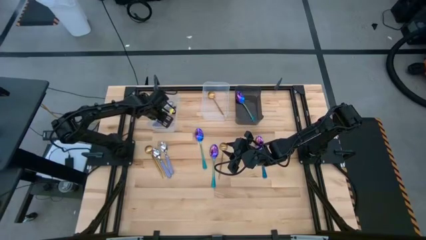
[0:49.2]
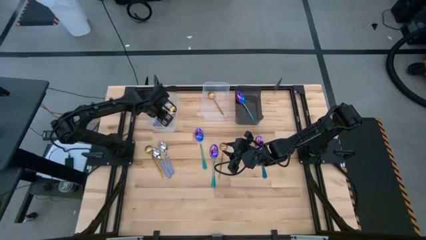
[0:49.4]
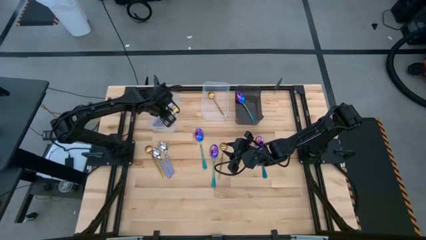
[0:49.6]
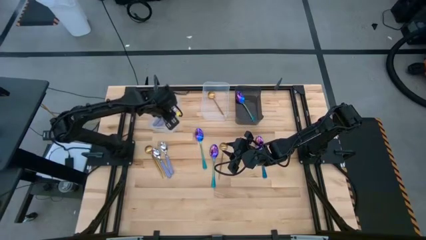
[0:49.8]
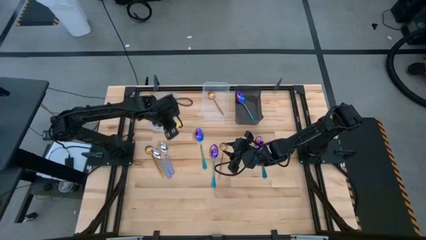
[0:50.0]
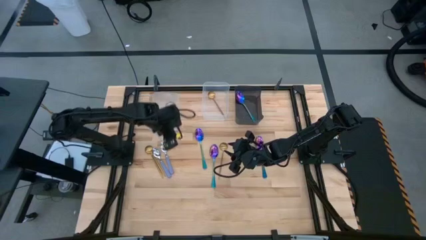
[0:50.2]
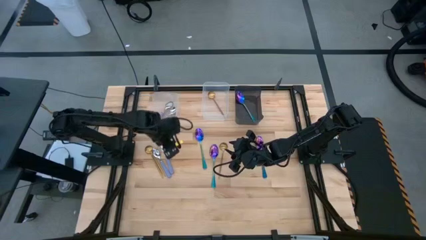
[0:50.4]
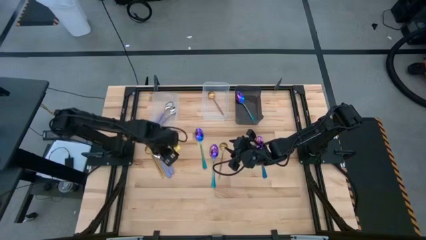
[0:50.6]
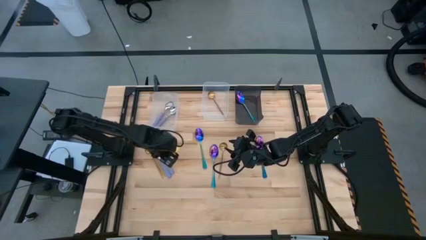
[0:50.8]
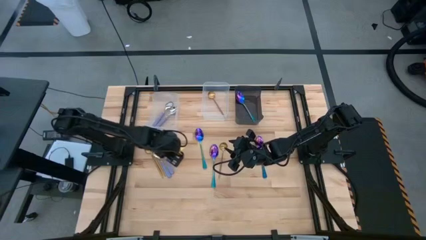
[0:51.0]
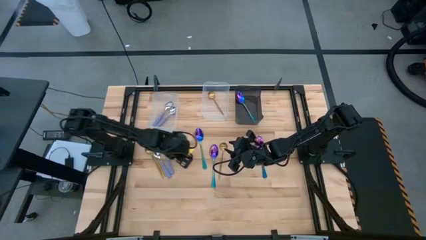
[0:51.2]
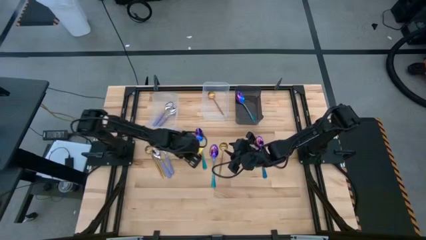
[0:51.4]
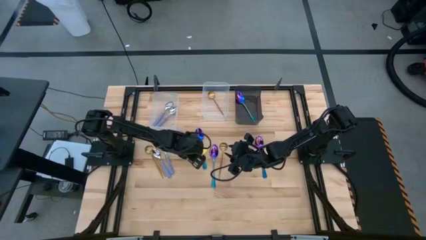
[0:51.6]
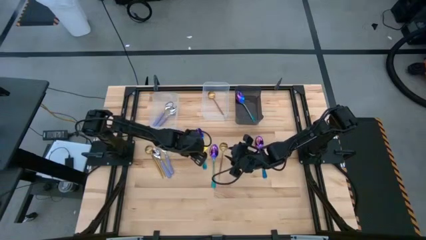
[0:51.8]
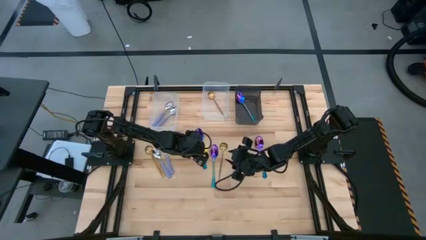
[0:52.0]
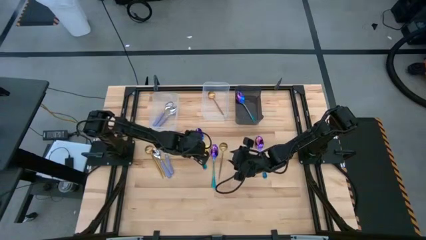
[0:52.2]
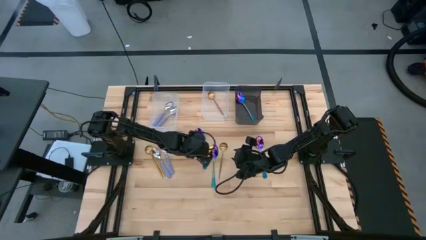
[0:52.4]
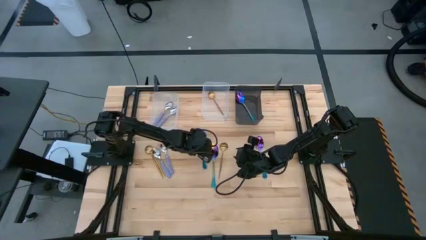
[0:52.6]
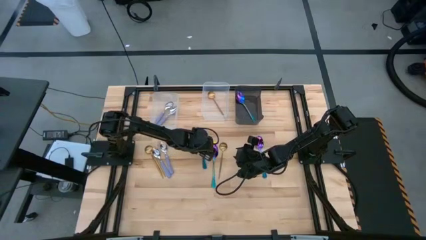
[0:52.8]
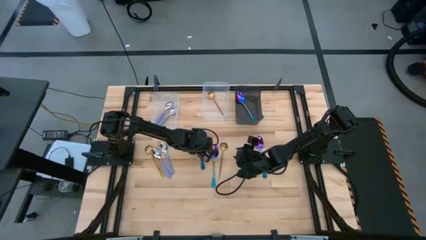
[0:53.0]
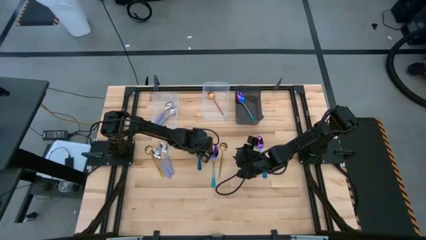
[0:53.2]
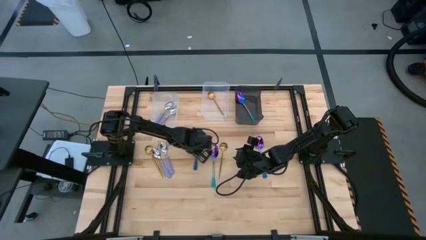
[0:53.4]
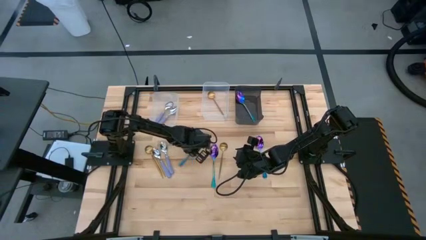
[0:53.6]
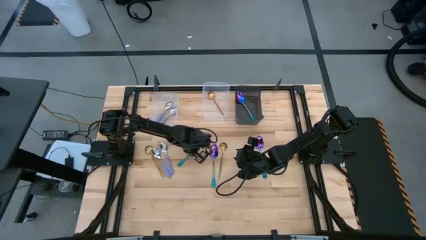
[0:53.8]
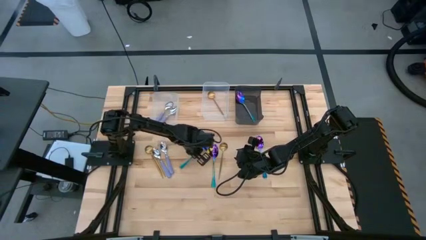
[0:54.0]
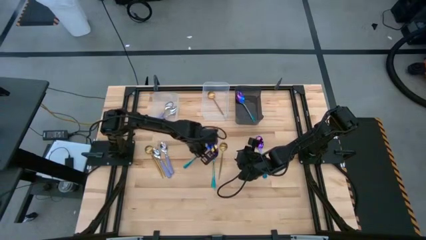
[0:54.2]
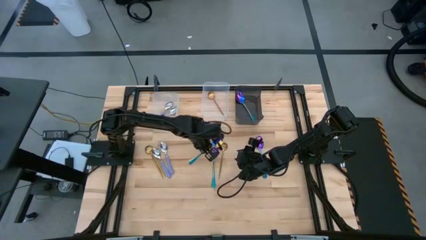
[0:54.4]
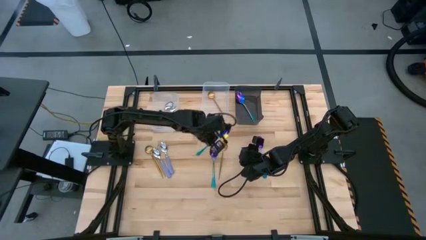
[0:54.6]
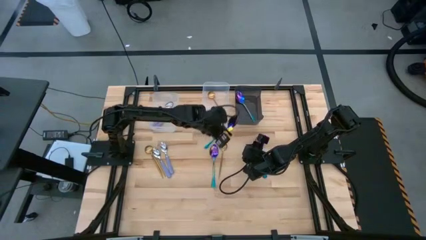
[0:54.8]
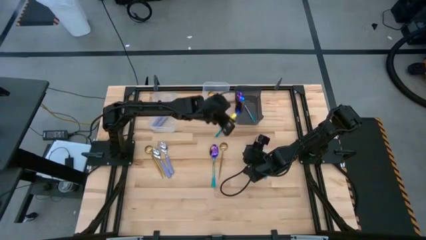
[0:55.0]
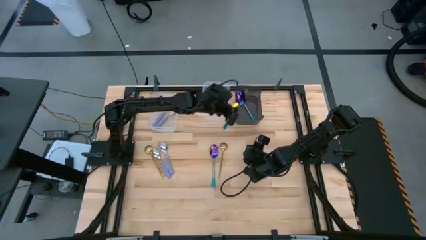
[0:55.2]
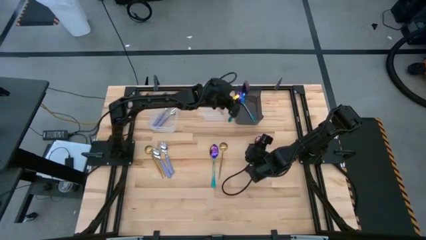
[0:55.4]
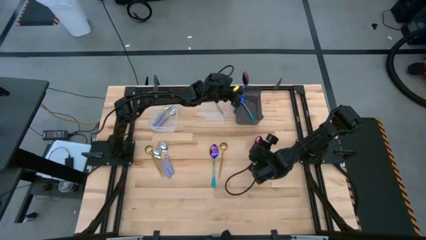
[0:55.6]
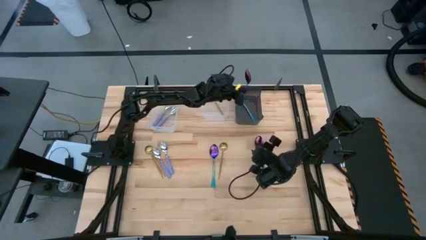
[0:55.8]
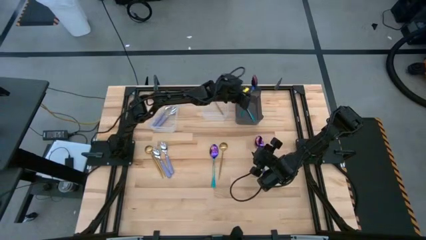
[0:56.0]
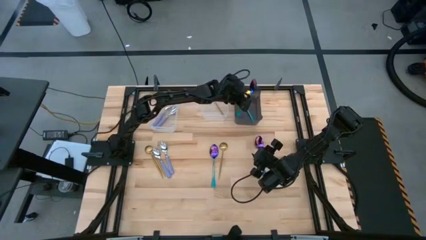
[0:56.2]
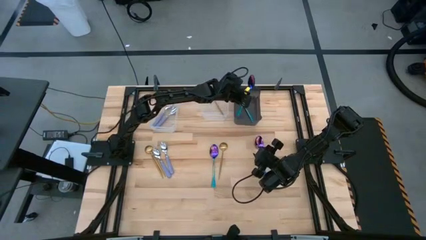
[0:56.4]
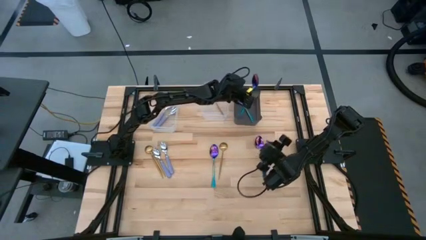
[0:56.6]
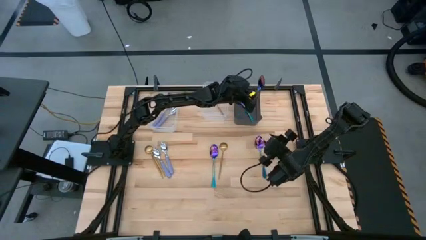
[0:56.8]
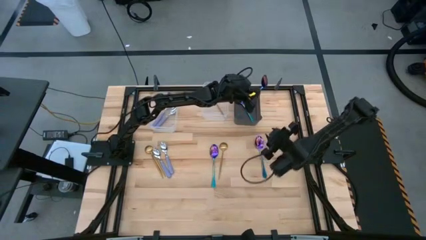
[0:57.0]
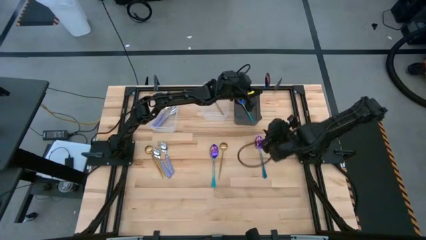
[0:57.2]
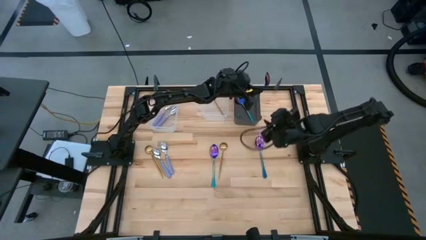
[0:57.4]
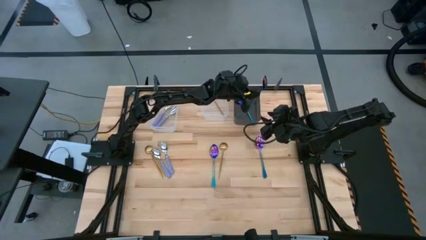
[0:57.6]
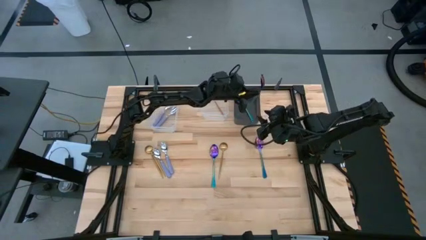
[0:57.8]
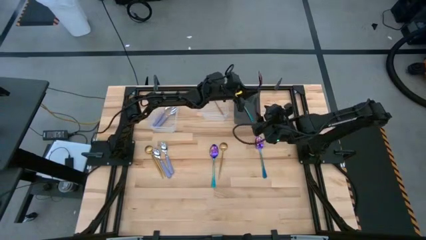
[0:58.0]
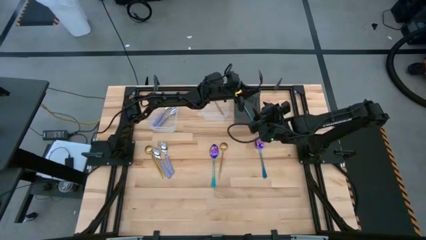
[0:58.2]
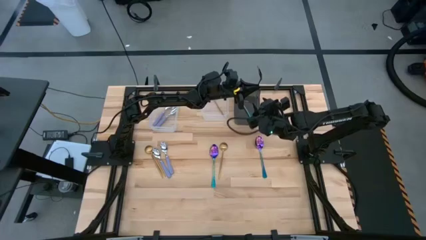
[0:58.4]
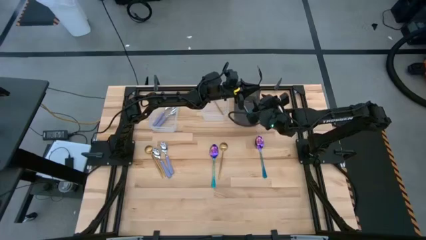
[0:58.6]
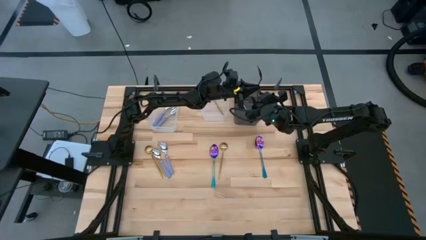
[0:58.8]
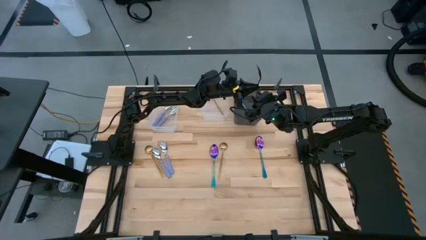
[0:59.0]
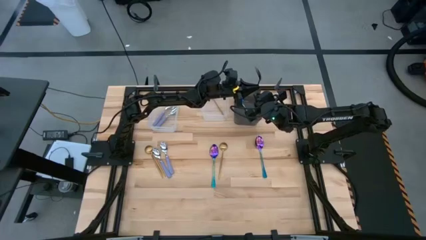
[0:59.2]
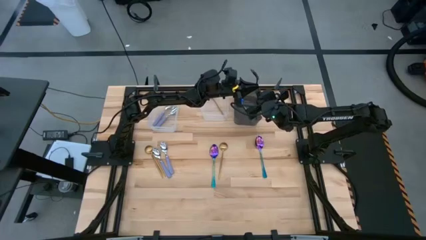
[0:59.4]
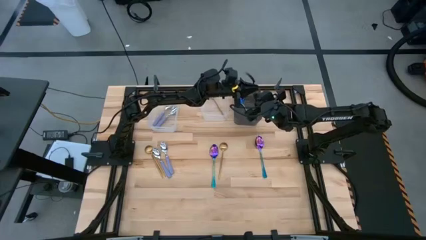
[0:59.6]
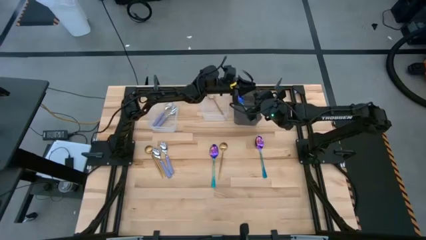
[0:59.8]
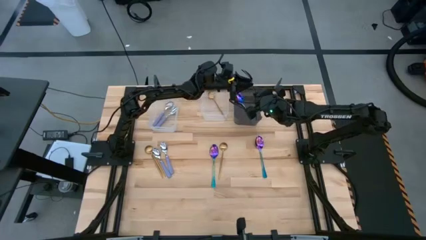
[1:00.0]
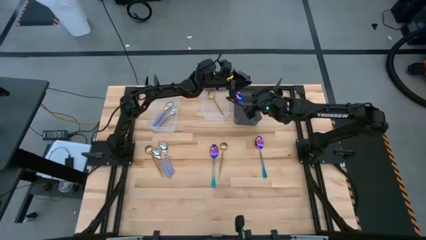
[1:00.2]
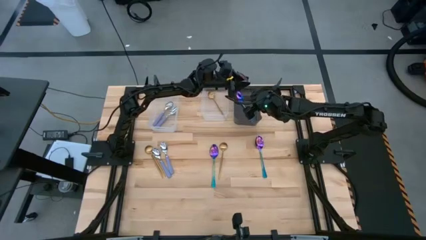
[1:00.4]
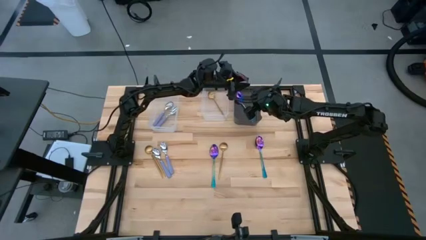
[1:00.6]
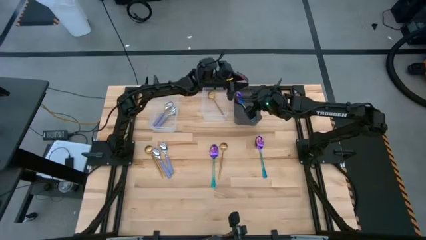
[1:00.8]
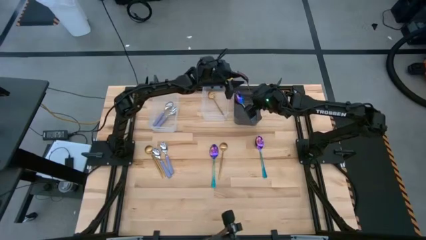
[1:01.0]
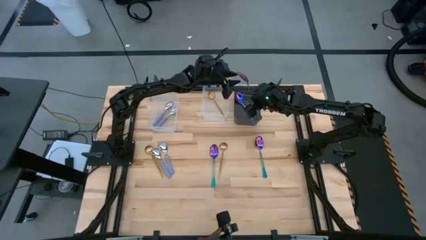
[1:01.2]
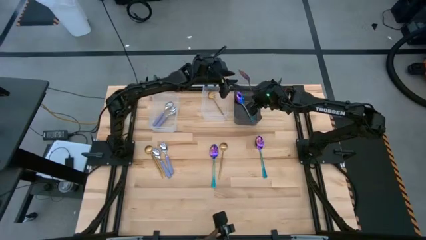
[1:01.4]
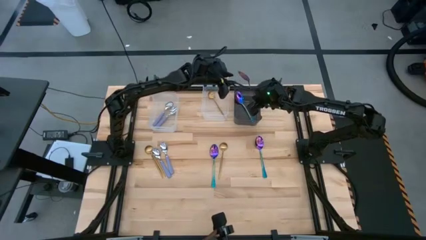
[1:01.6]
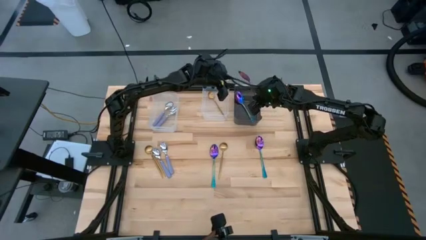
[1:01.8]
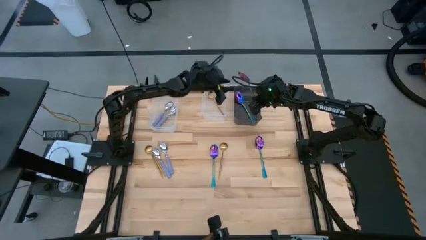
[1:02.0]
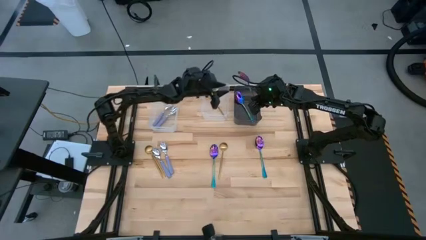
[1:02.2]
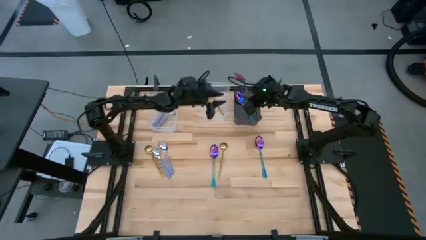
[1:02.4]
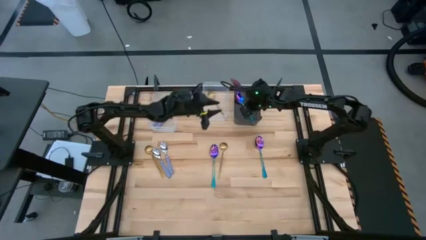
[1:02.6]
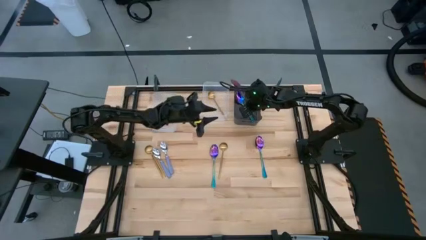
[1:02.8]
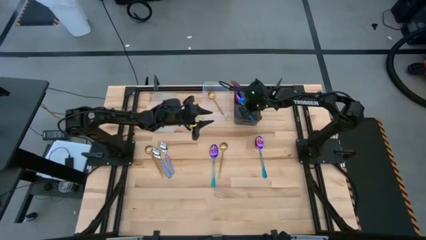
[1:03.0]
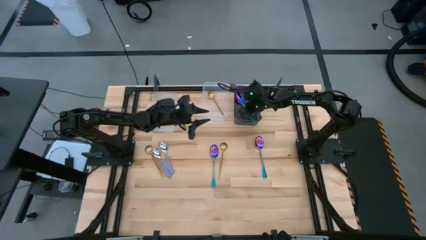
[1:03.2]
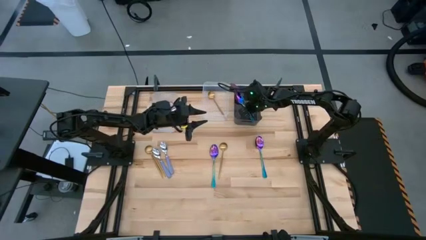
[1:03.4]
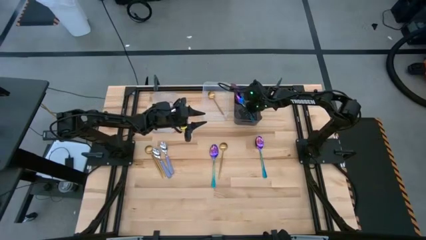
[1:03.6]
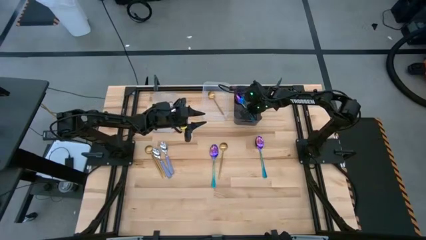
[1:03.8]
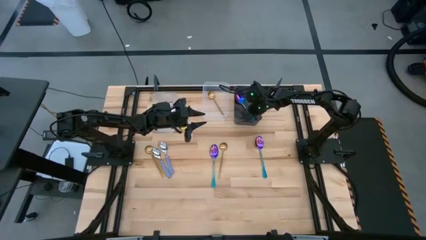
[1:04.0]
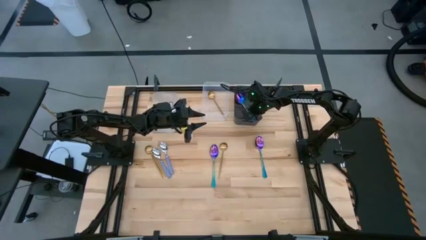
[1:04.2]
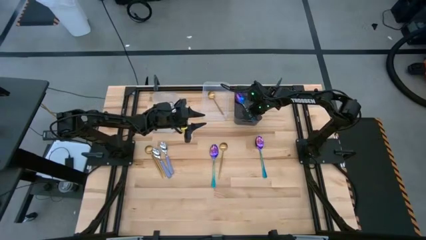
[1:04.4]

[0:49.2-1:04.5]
Task: Sort silverware by color (type)
Put the blue spoon into the black bin

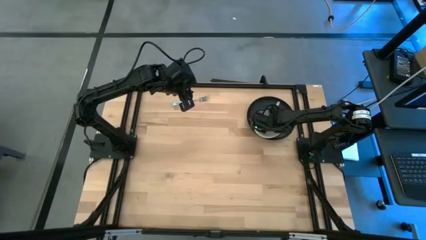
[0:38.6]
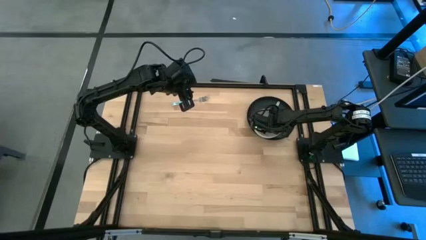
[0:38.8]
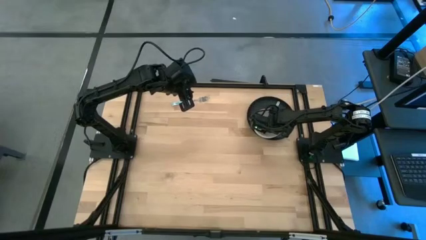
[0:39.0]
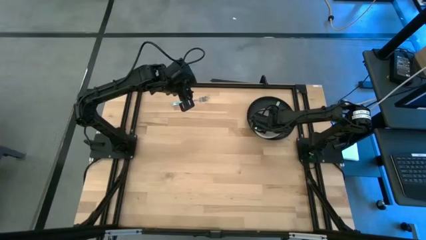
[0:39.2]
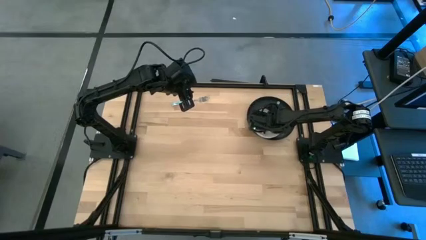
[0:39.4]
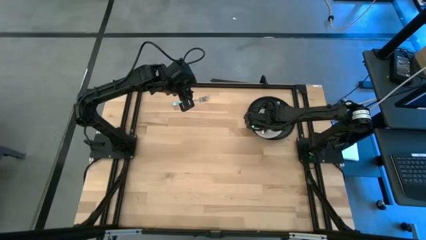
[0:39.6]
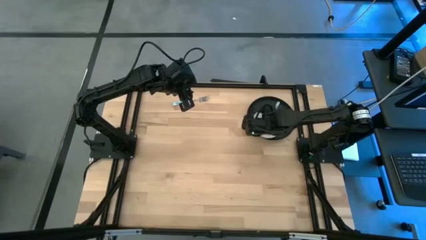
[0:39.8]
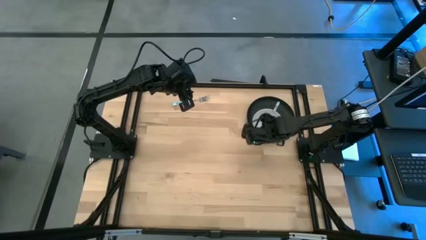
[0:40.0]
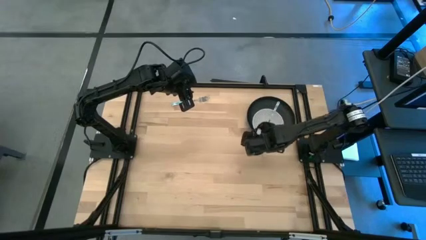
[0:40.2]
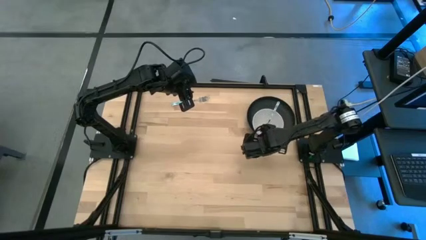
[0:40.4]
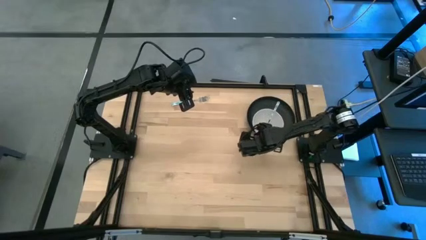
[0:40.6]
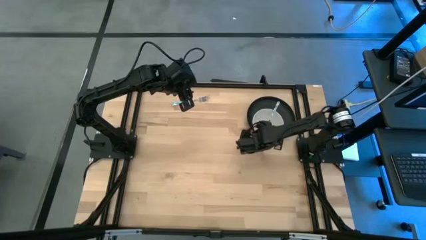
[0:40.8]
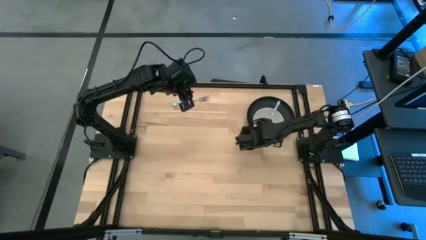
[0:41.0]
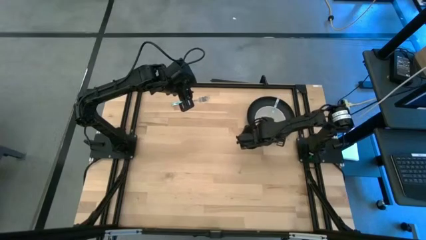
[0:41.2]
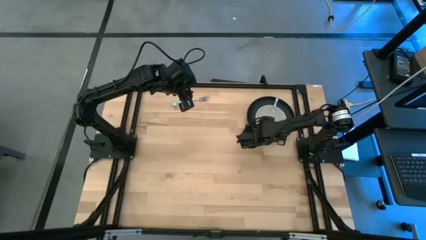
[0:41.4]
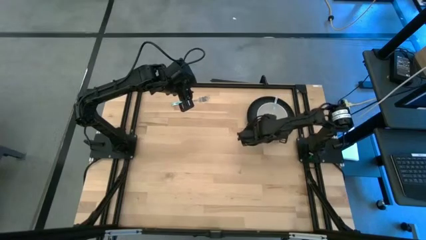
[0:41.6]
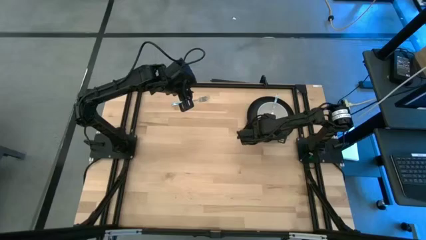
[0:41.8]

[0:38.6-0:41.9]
Task: Set table place
Adjust the white bowl
